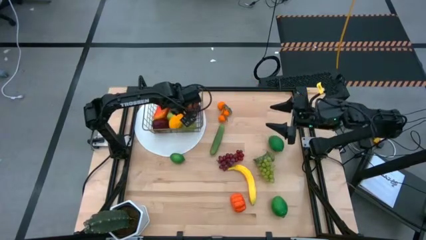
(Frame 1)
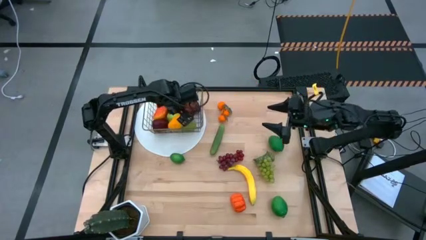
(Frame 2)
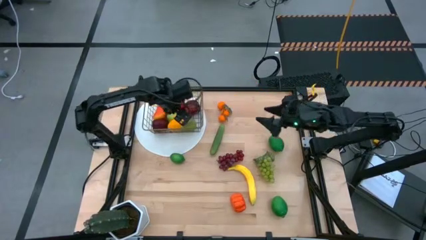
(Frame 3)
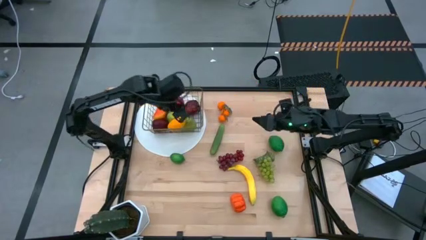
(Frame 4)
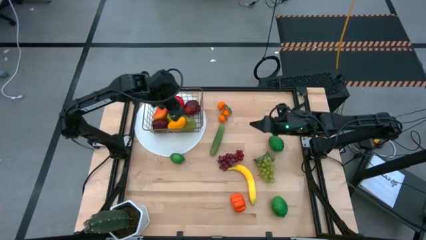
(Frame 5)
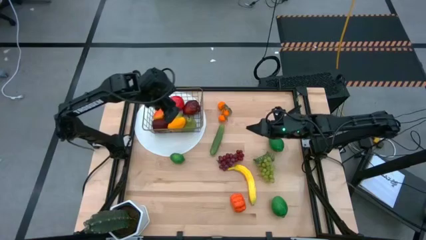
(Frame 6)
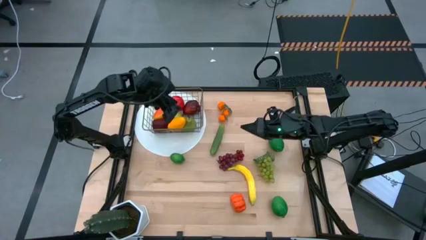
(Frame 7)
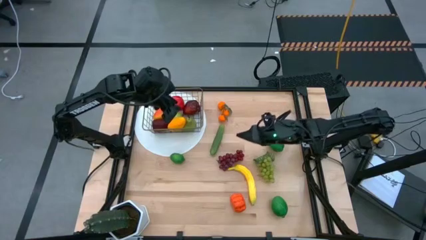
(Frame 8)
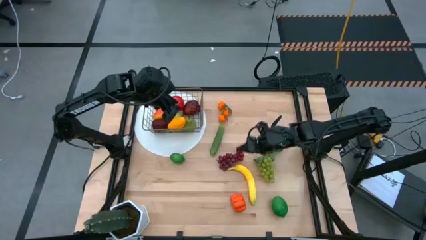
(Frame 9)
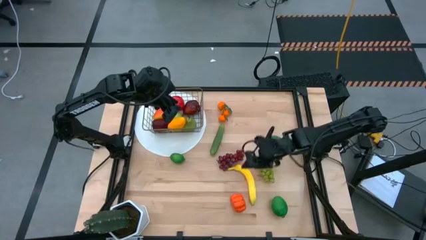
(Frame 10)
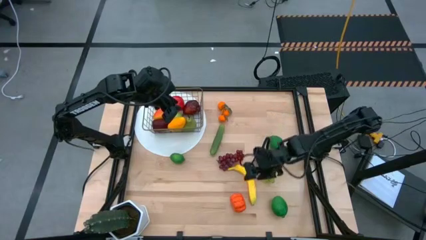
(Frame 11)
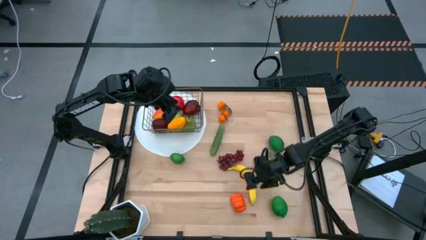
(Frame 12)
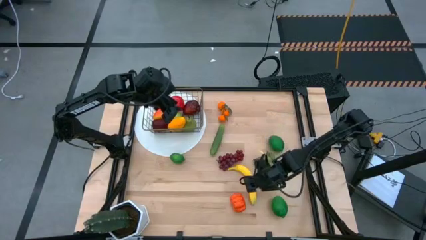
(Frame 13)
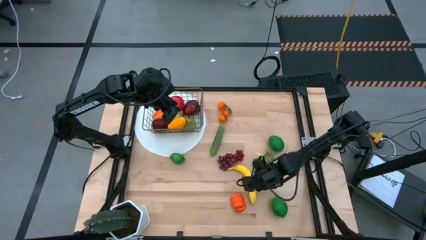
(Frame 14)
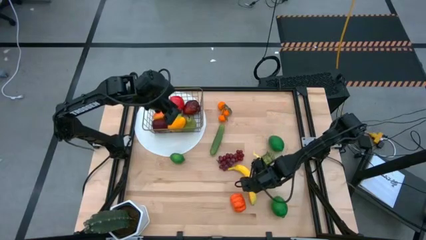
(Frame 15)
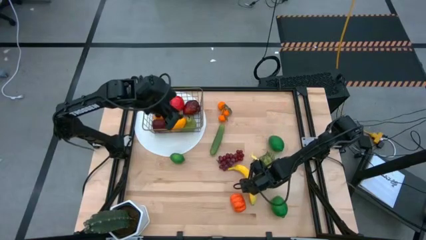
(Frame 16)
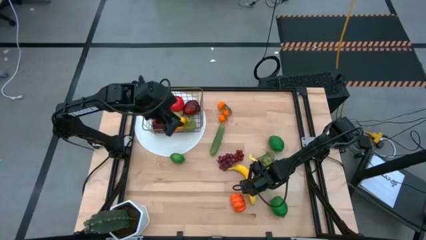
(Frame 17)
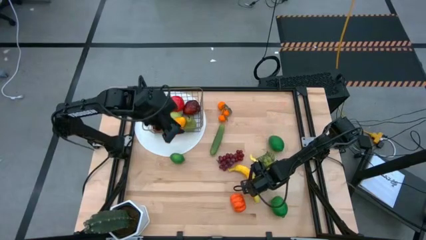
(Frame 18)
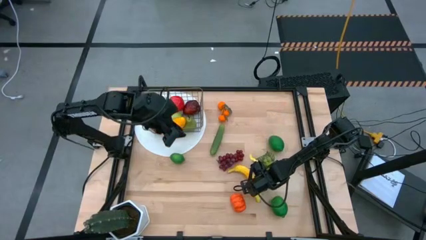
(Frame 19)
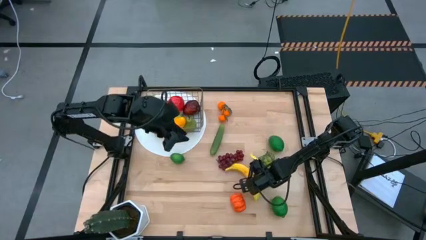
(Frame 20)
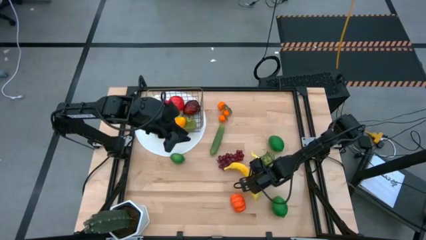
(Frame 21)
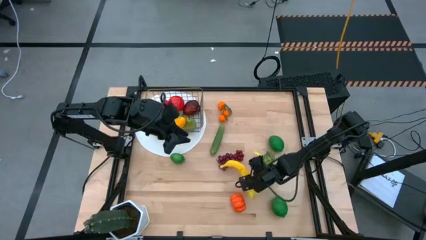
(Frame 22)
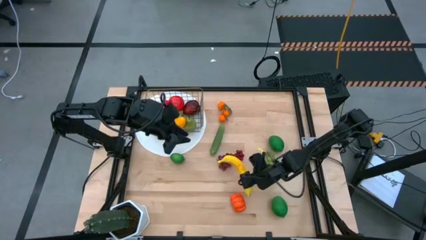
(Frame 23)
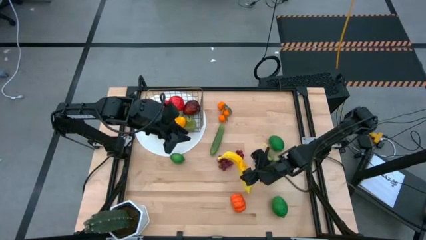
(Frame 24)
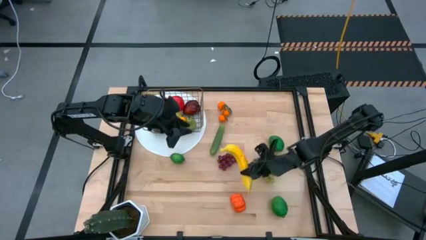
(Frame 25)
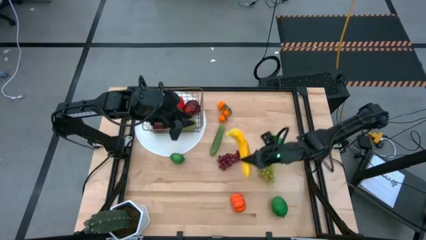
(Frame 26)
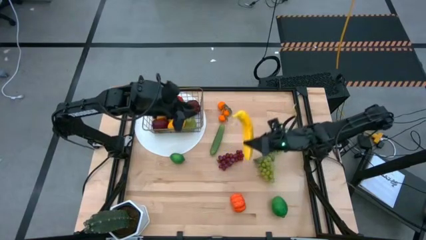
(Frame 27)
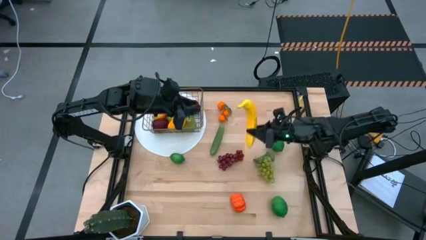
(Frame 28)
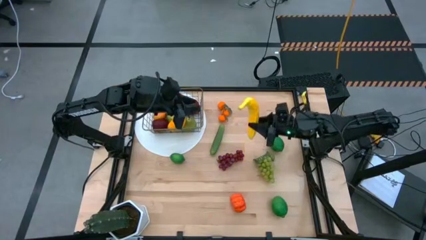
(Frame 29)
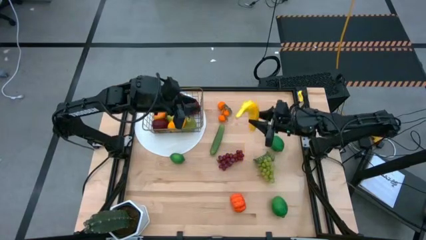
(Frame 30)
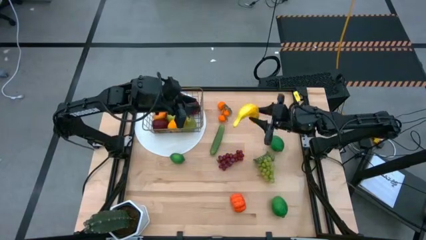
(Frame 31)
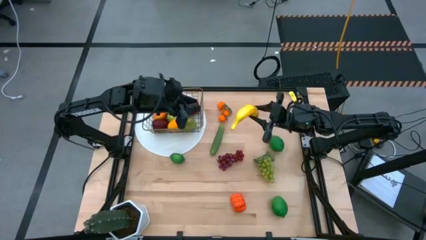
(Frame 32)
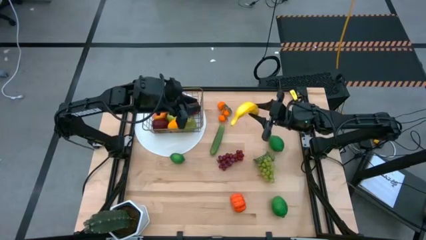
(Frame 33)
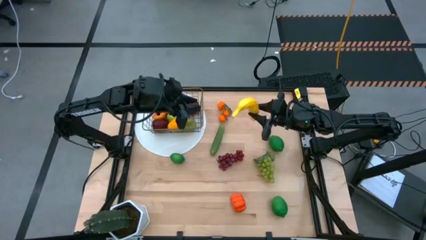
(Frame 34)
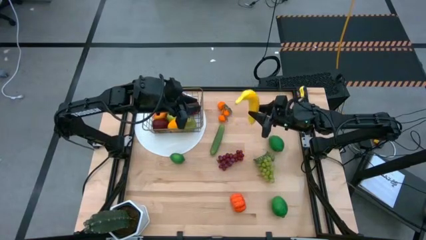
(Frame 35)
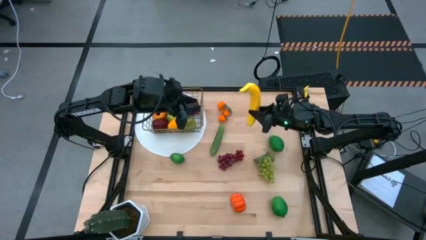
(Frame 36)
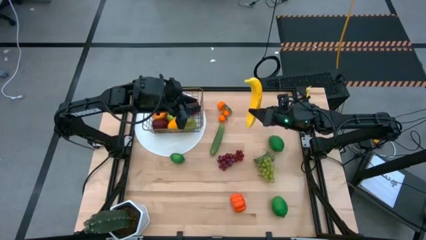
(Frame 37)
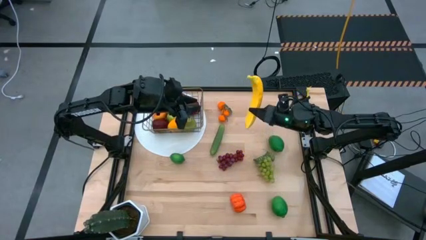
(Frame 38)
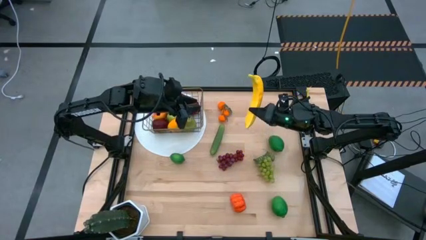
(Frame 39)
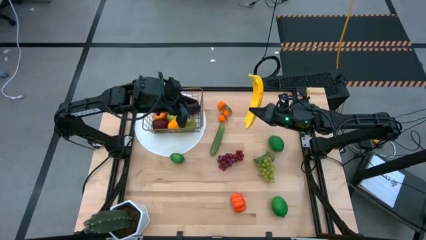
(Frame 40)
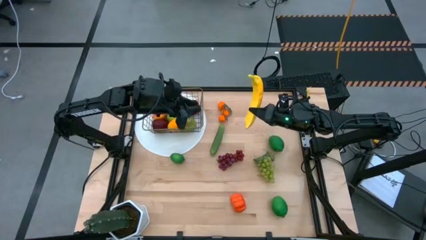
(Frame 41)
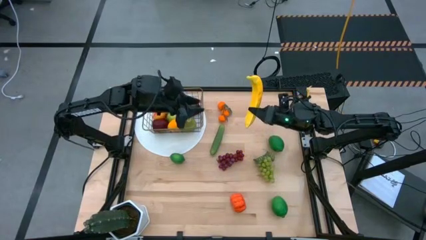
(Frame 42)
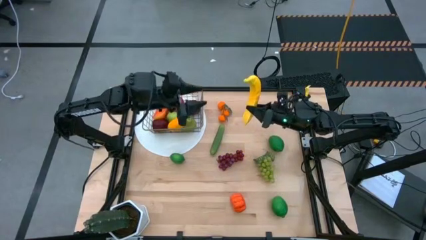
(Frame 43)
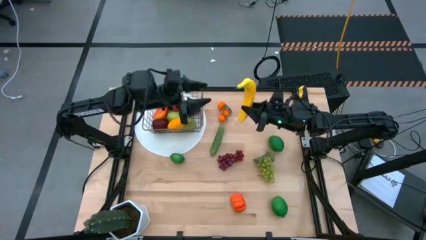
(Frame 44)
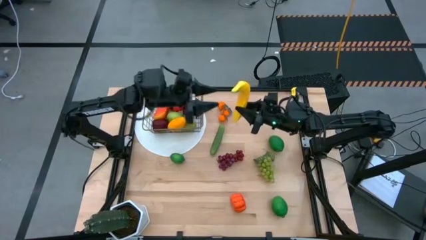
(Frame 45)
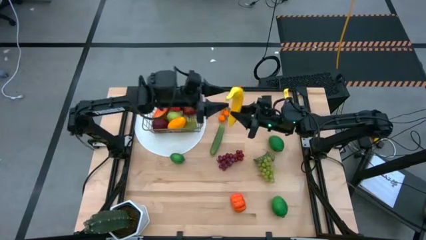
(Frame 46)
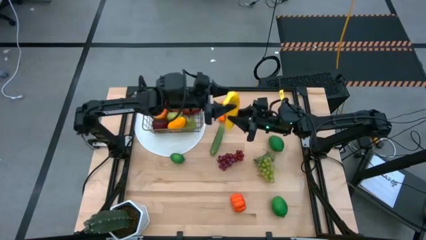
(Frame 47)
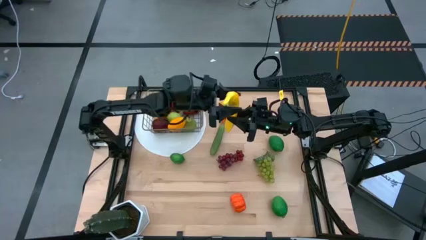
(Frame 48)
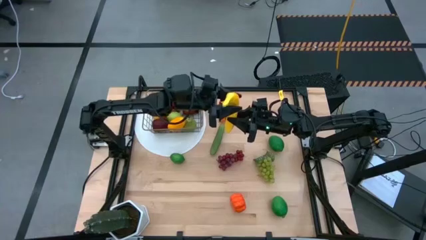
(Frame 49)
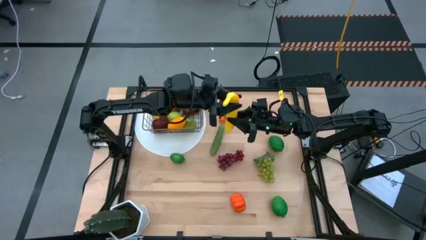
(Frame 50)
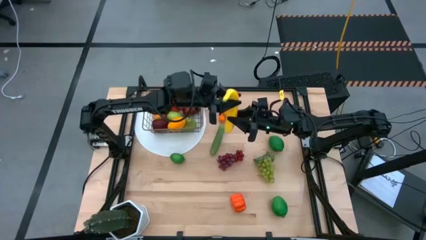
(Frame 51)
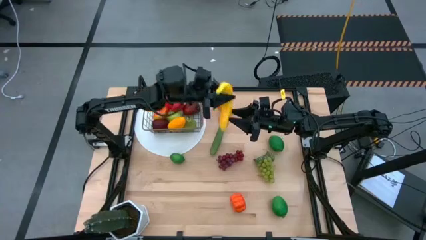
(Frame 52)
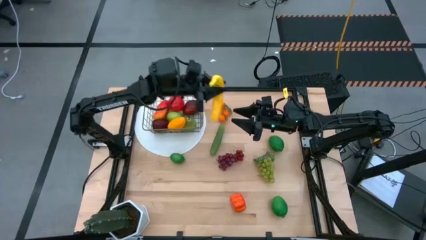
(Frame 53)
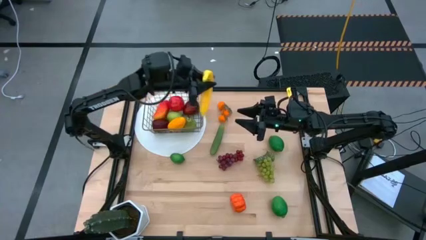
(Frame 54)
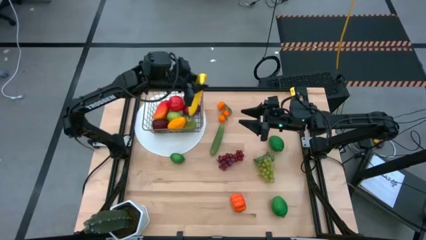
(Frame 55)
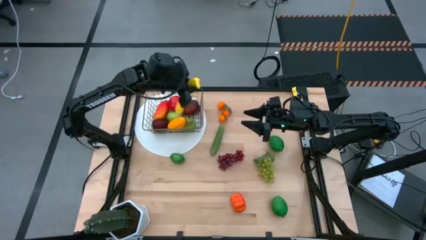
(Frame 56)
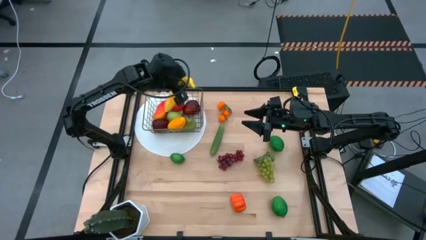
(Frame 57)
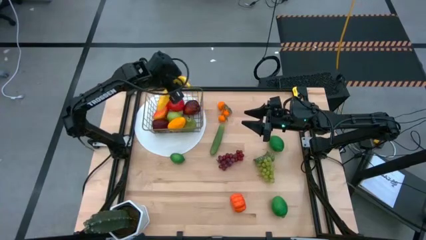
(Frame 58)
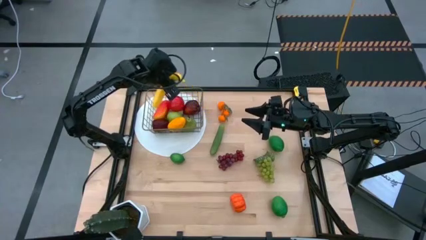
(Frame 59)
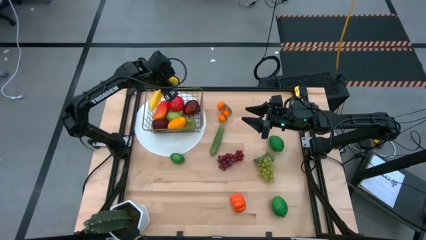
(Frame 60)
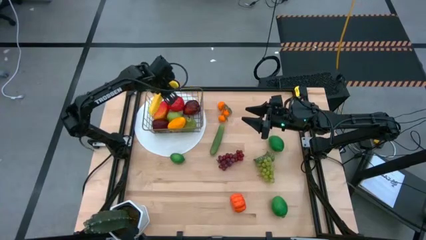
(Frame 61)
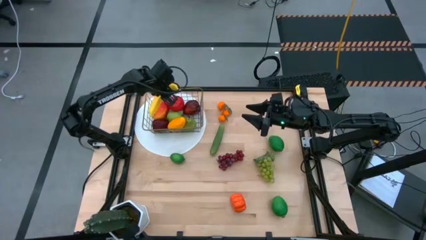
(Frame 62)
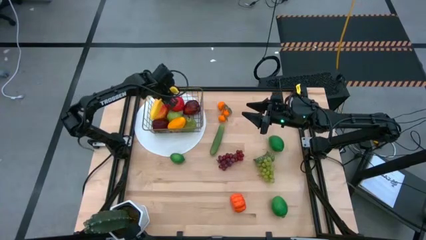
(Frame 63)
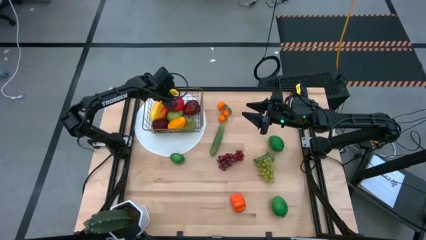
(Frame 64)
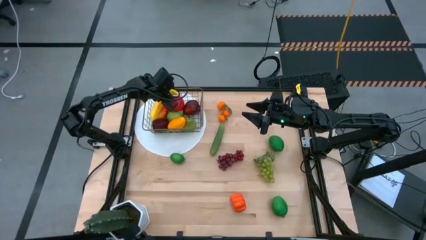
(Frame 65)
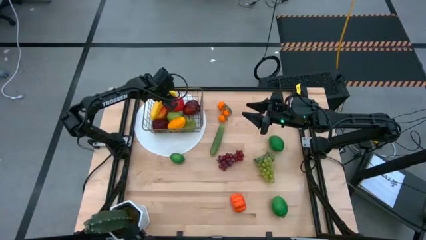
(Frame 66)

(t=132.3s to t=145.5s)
Task: Build produce basket
Put the banana into the wired basket

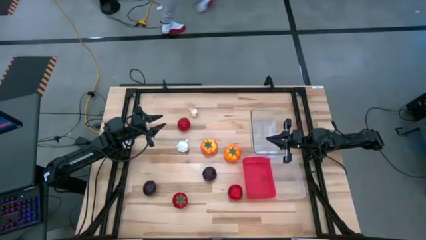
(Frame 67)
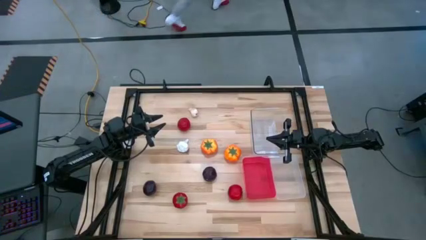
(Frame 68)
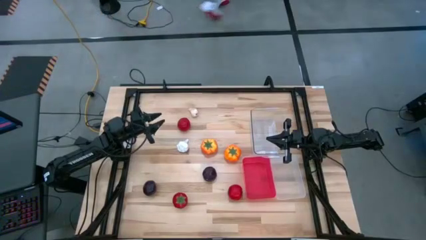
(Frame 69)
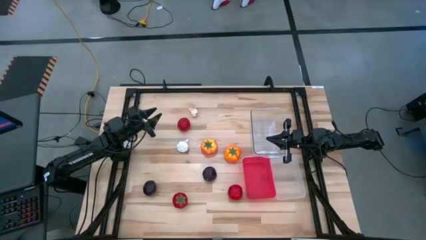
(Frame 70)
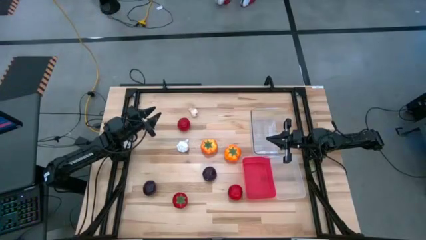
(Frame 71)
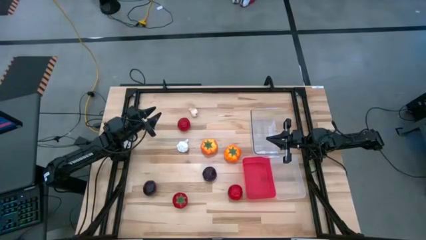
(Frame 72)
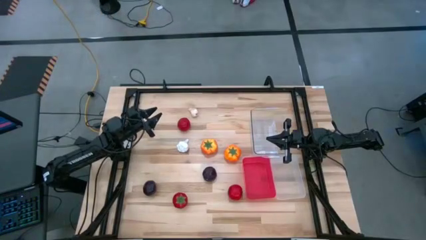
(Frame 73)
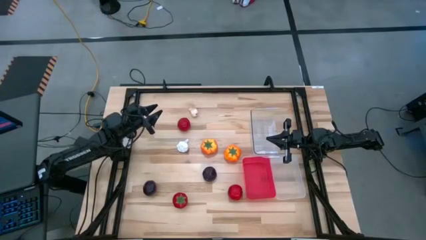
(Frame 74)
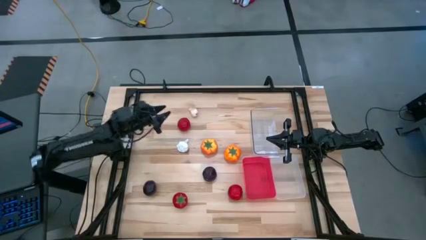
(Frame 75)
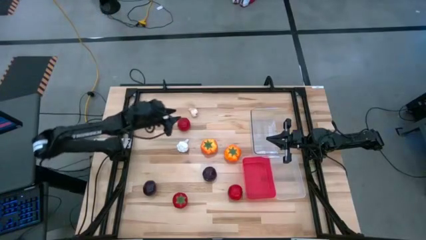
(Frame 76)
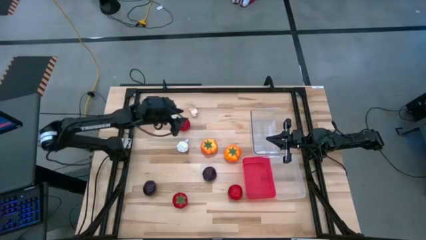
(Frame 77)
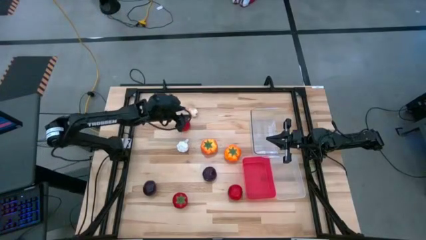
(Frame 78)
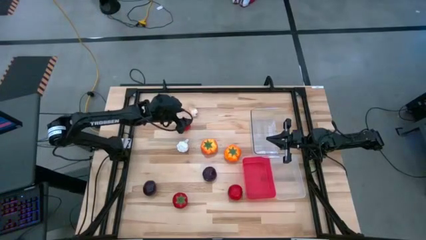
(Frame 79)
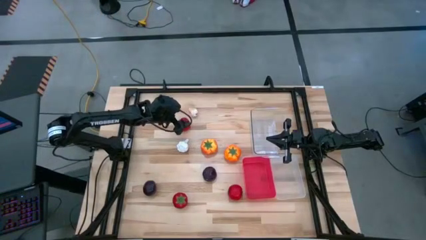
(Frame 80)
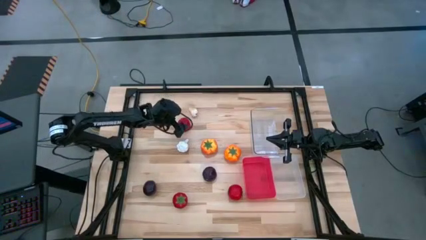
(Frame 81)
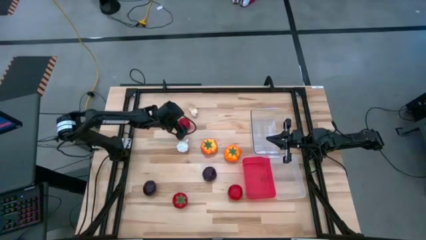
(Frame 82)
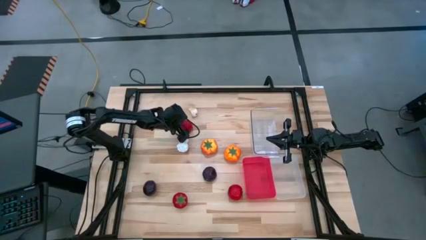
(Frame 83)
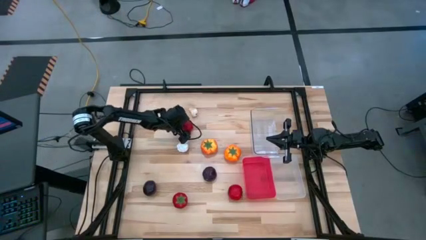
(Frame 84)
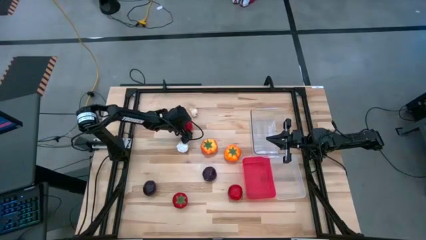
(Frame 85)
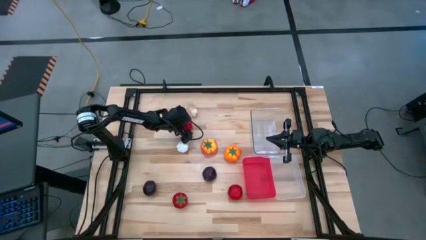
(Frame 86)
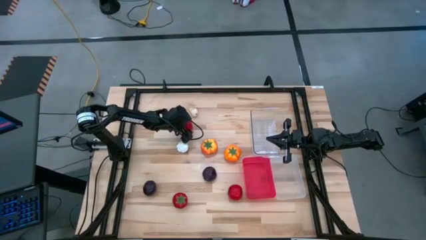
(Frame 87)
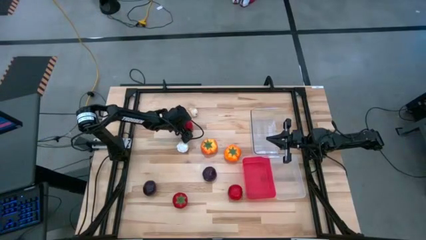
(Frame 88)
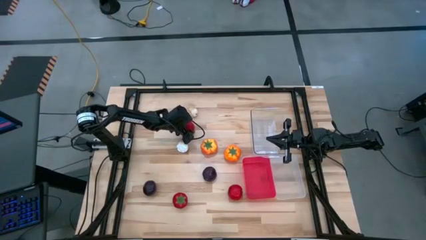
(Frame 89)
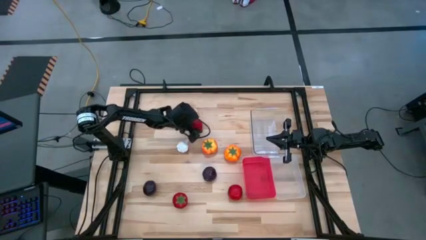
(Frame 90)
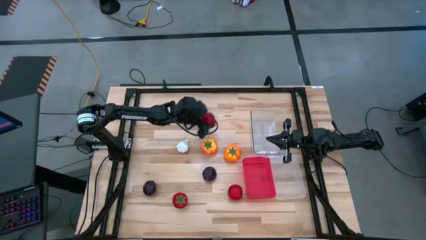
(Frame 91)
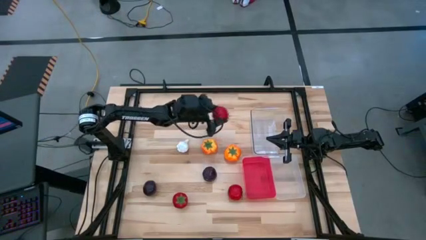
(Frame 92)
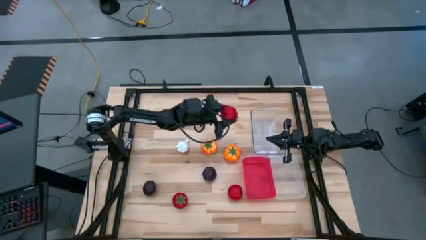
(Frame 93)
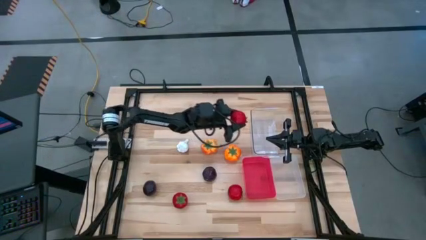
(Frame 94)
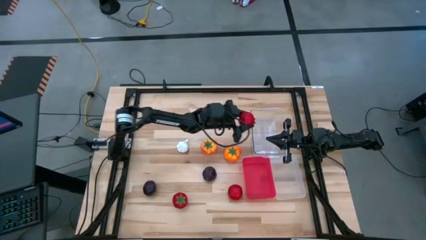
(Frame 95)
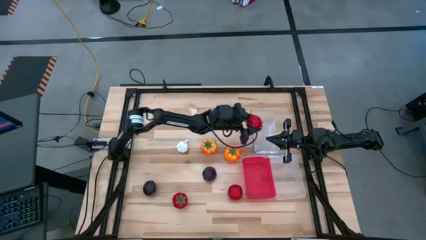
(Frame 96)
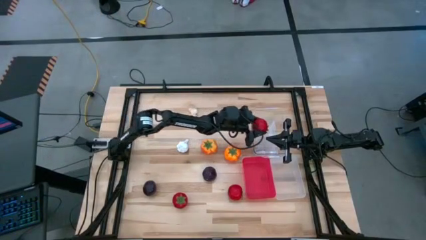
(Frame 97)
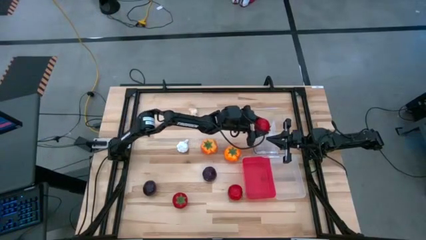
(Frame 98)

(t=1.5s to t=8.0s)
Task: Sort produce into baskets
Put the top left red tomato into the top transparent bin
